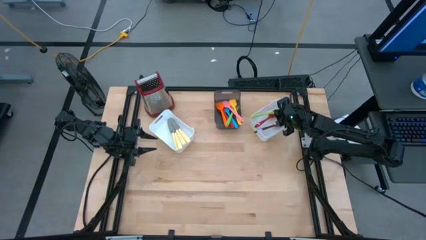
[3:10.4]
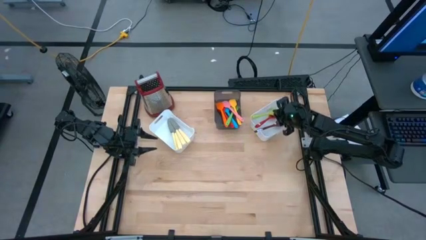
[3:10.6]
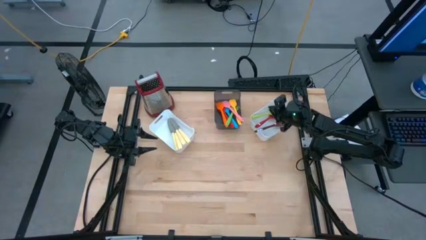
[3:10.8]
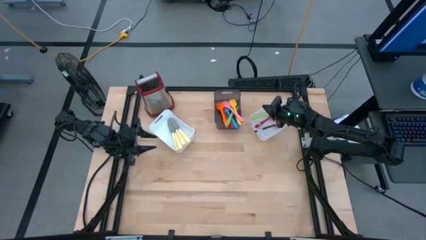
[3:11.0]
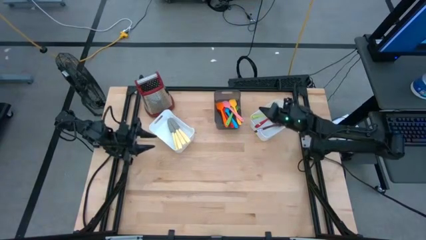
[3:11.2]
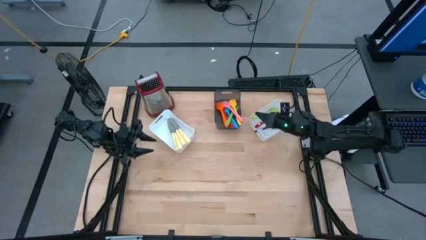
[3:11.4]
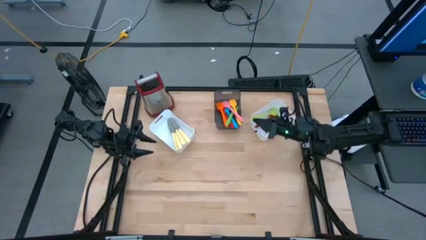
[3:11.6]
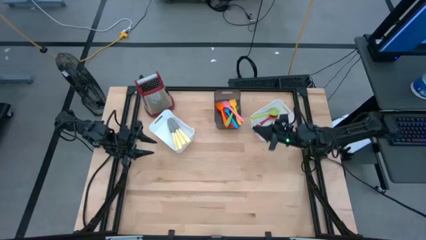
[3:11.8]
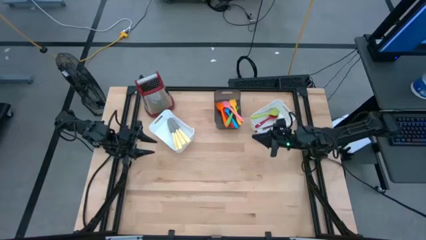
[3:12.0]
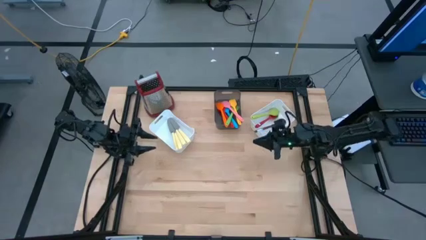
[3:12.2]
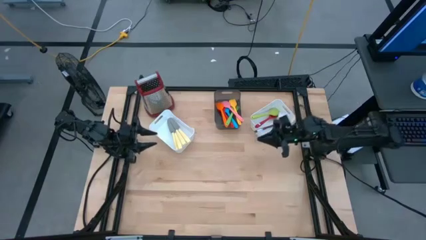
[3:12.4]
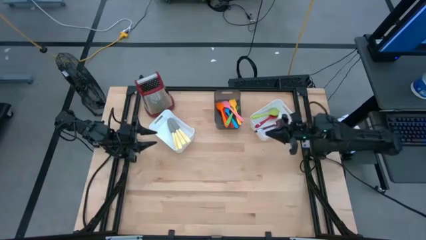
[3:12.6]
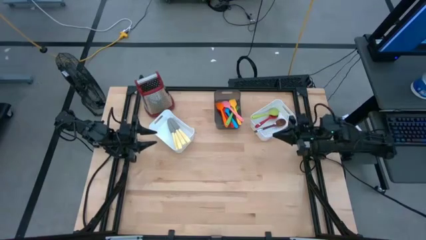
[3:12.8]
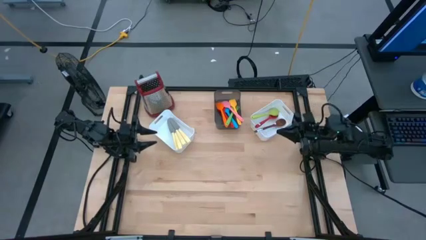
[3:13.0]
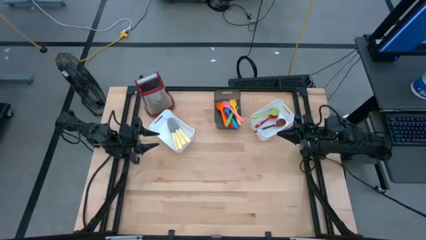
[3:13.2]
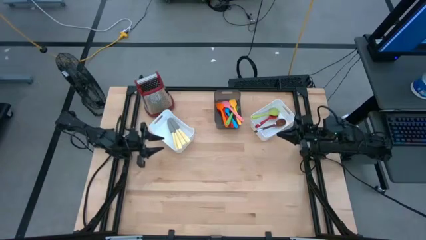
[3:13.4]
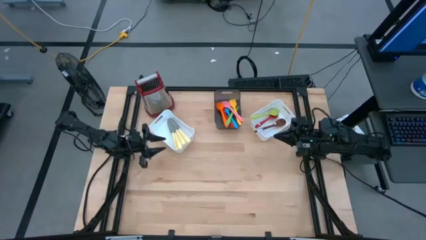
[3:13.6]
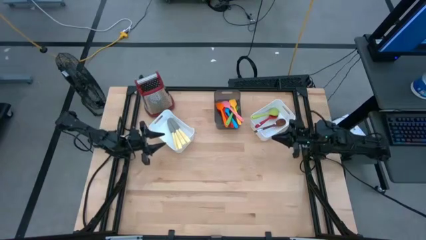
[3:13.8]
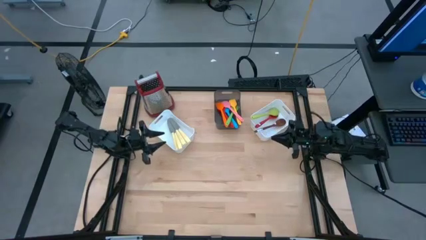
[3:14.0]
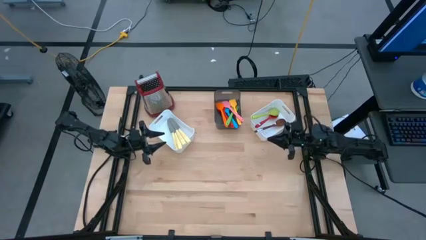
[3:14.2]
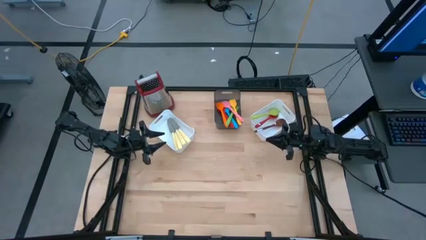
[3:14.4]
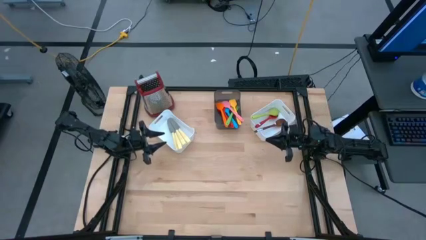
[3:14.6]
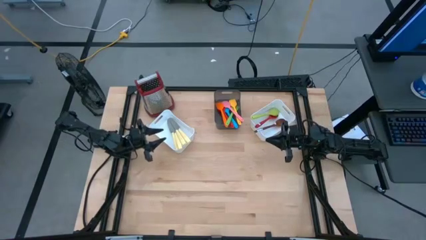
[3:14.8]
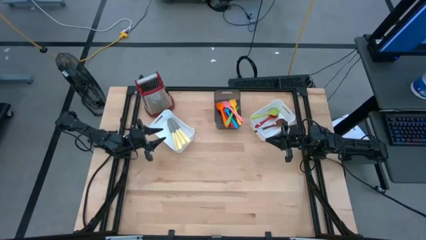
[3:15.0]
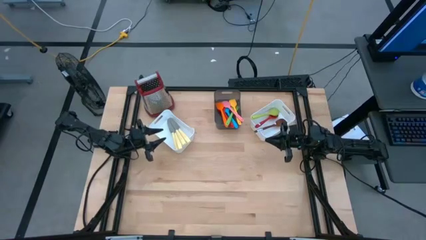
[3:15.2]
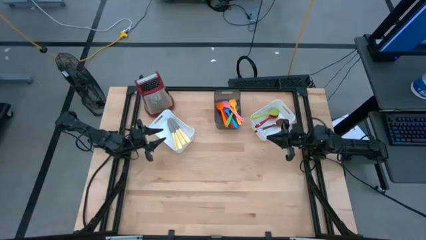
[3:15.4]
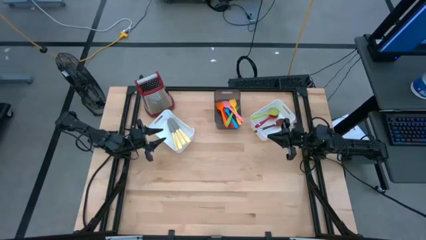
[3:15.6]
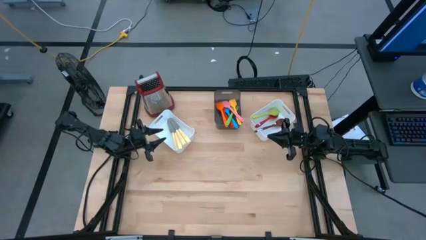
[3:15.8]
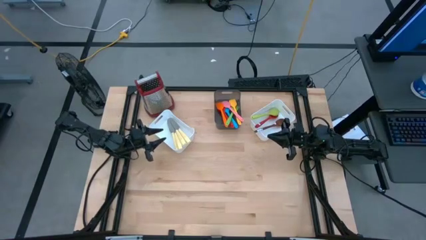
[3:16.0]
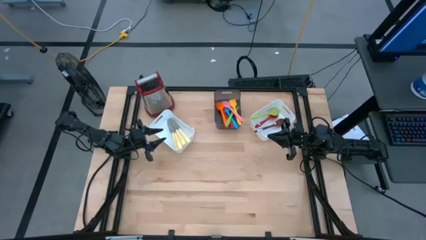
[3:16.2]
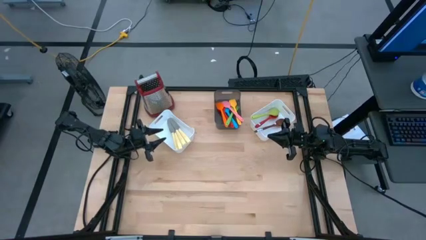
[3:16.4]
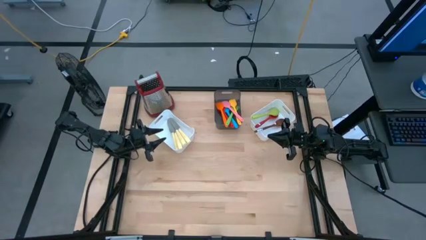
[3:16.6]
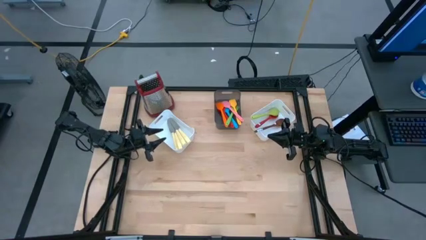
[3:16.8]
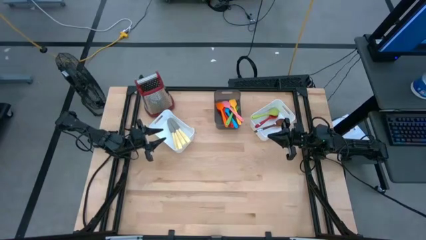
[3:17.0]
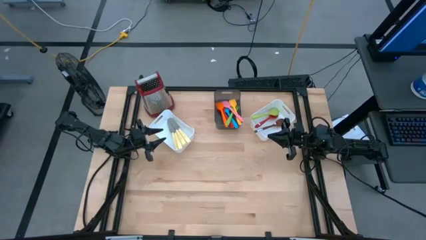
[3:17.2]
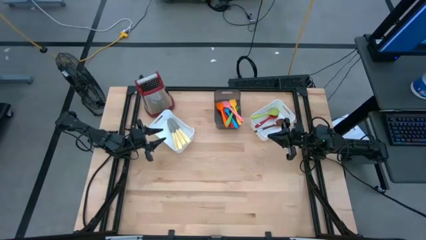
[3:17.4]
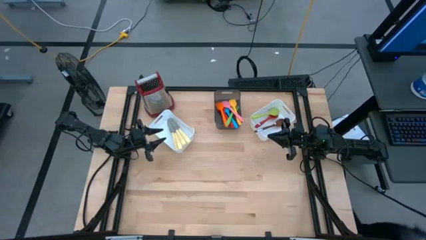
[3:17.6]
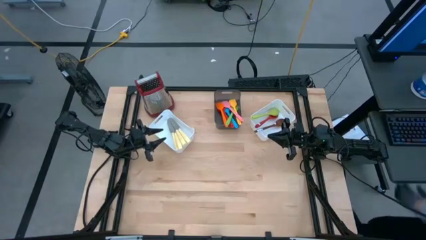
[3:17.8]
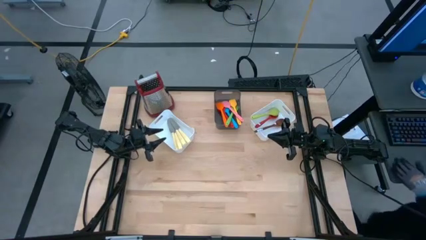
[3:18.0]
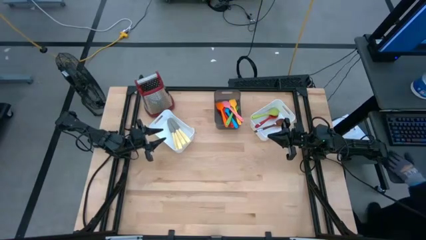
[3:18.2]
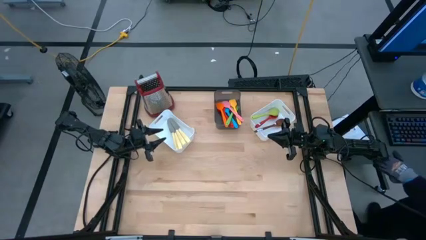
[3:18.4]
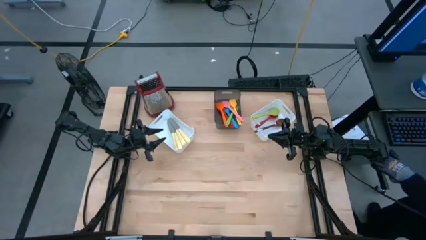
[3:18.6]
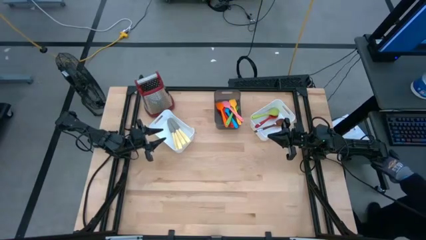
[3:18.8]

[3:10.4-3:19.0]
Task: Pick & Place Kitchen Items
Return to Home Position
